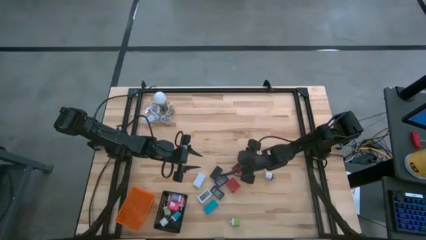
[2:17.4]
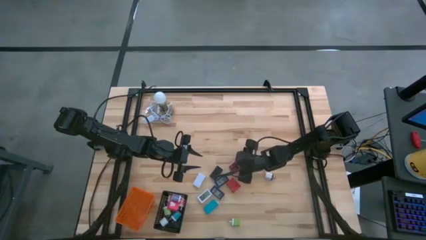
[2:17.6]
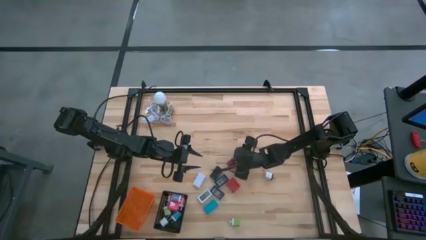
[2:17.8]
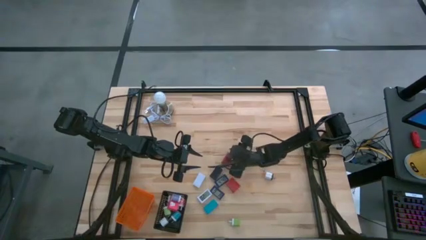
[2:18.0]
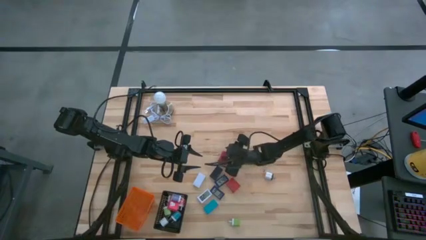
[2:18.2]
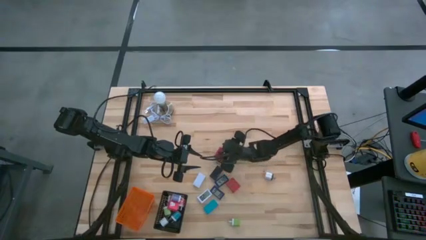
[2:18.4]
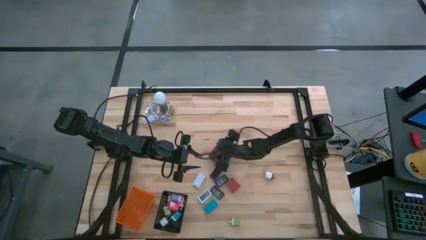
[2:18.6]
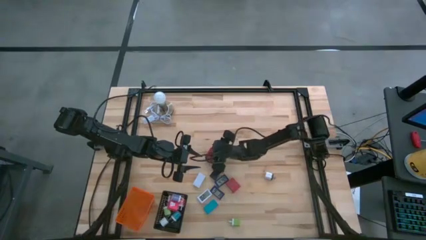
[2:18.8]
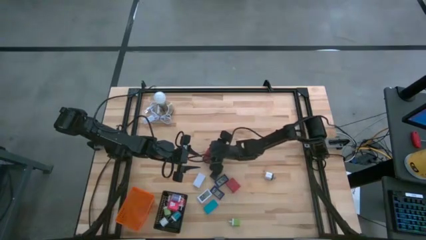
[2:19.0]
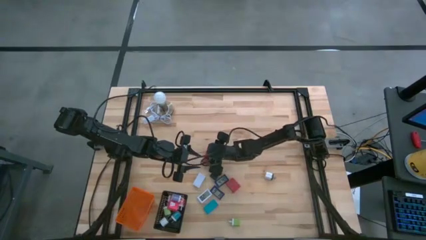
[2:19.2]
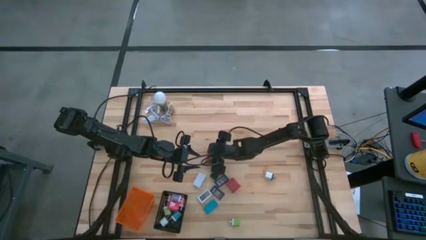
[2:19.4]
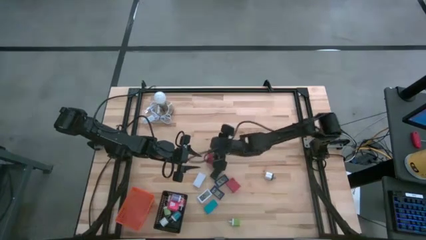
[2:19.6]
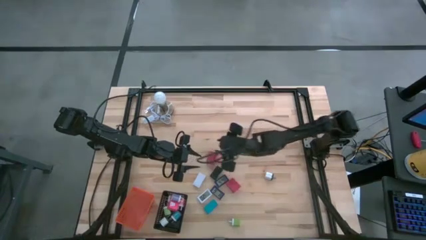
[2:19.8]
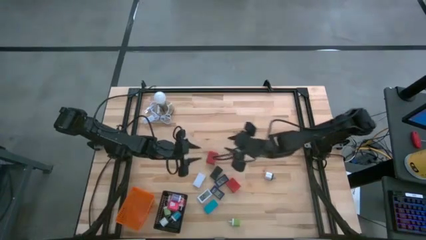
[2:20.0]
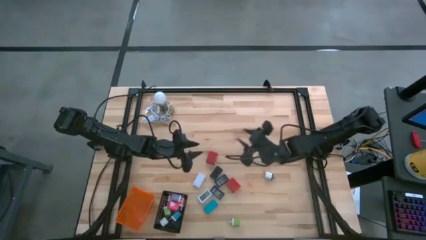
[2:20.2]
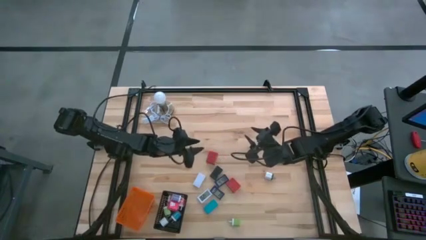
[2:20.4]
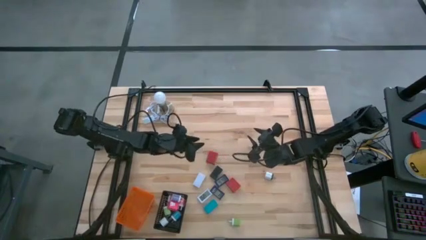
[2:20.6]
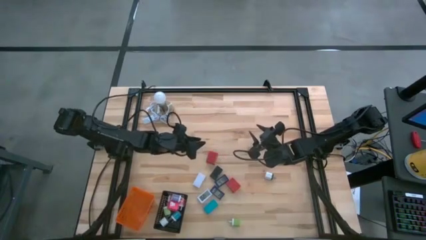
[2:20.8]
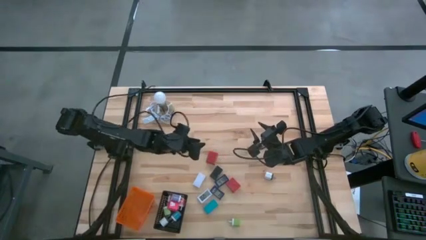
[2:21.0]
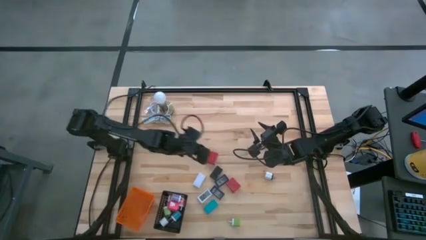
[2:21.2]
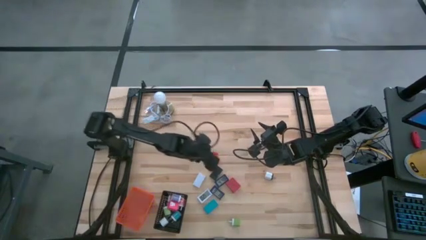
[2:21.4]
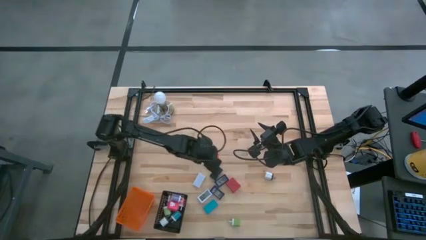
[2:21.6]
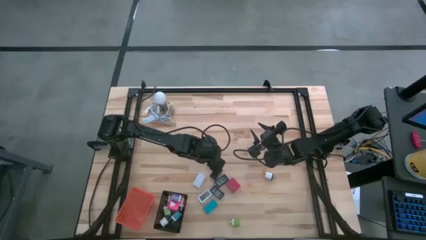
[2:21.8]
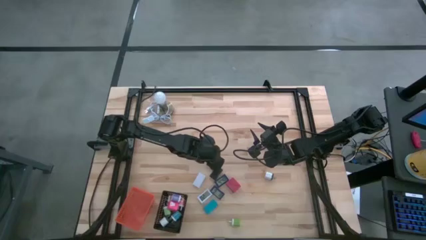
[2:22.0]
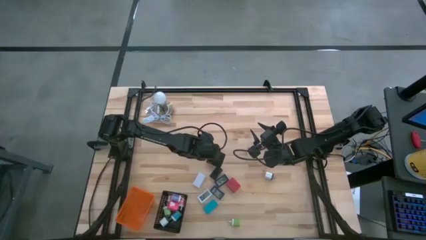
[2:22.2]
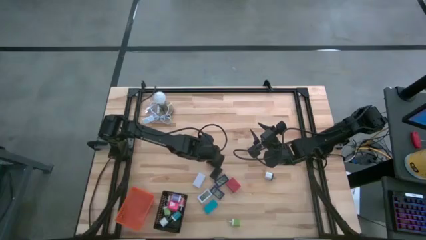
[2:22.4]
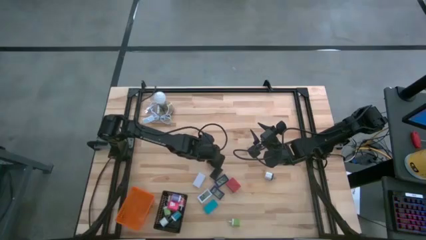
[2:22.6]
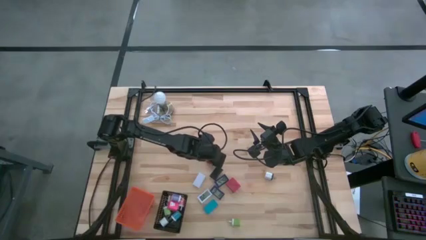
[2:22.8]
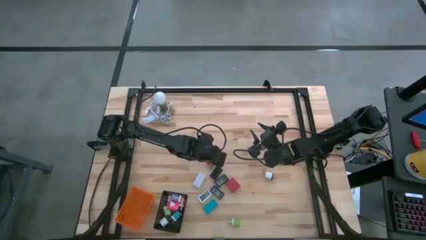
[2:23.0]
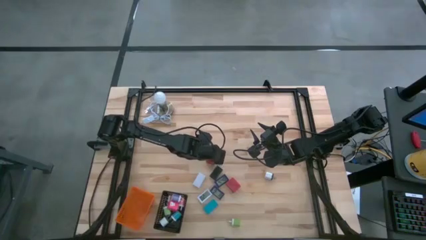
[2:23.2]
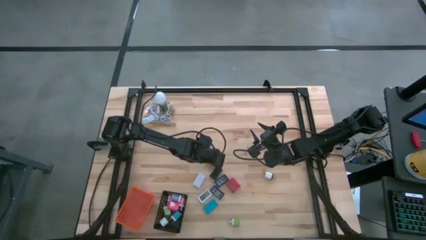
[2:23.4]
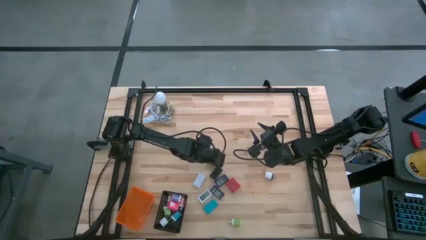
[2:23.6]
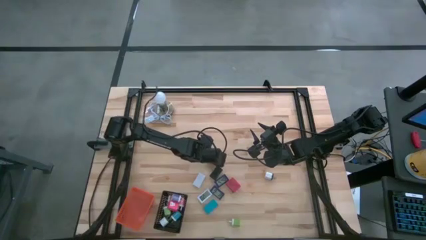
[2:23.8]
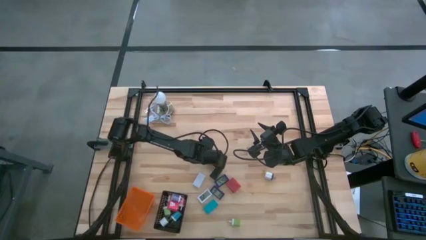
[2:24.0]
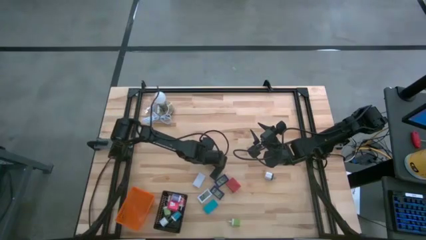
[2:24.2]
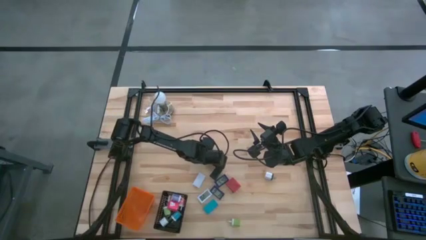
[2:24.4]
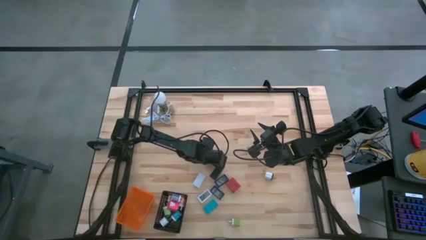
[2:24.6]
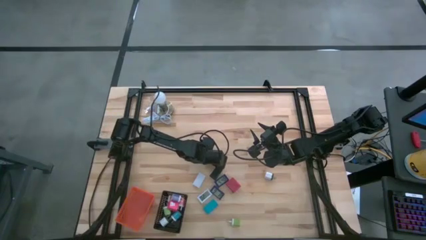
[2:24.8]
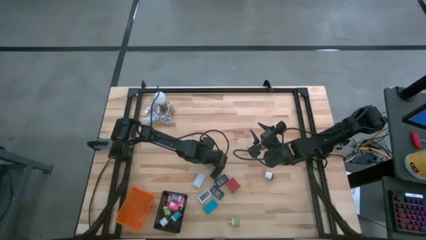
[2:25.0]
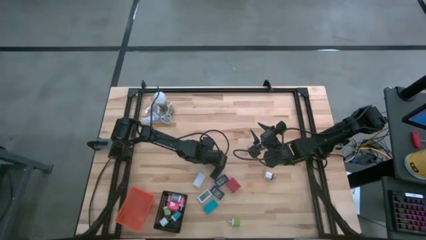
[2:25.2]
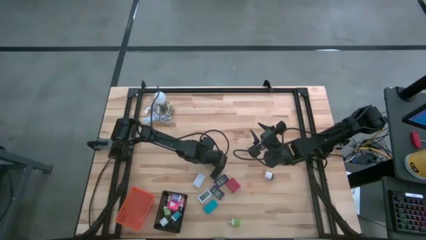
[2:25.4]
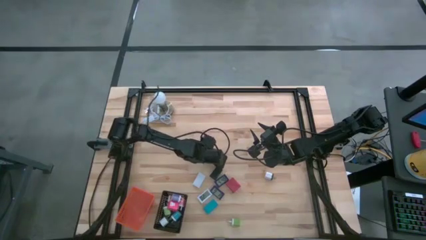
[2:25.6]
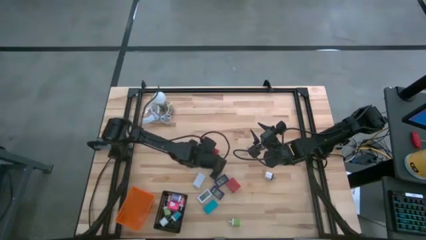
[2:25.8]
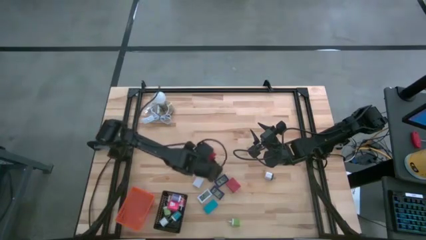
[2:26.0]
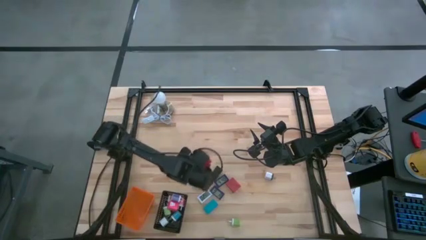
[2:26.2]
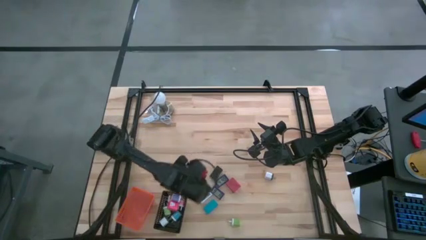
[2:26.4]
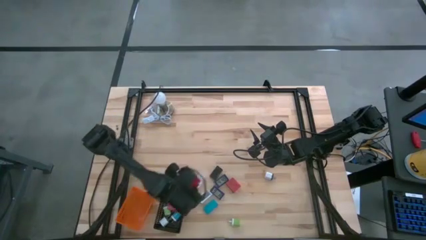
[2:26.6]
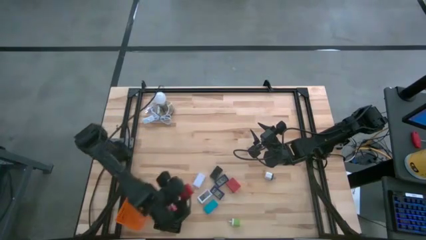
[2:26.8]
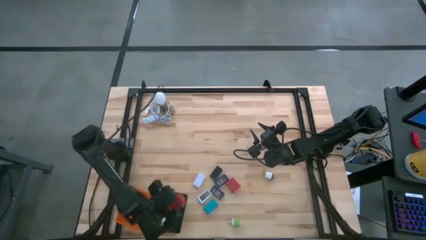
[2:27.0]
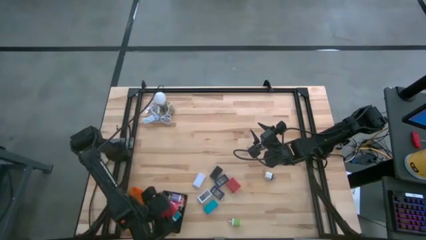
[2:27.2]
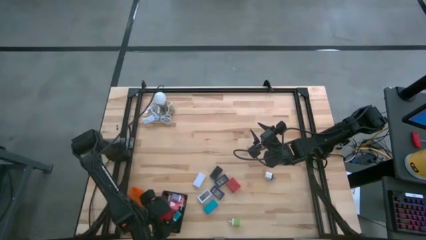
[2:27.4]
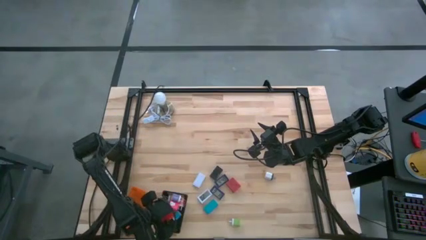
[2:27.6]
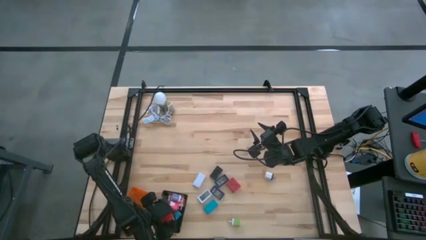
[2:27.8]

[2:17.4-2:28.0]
Task: Pick & Place Office items
Put the top red charger adapter into the black basket
